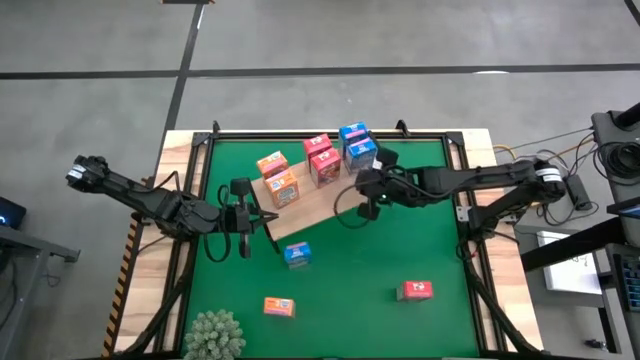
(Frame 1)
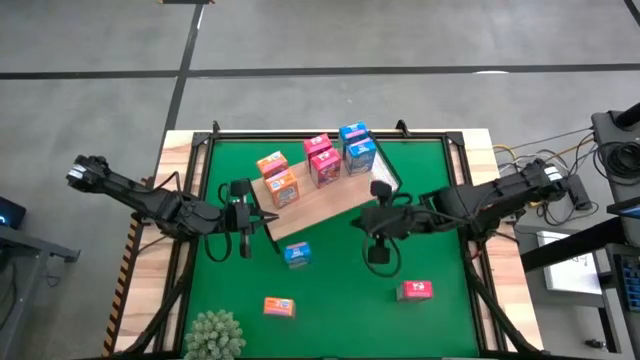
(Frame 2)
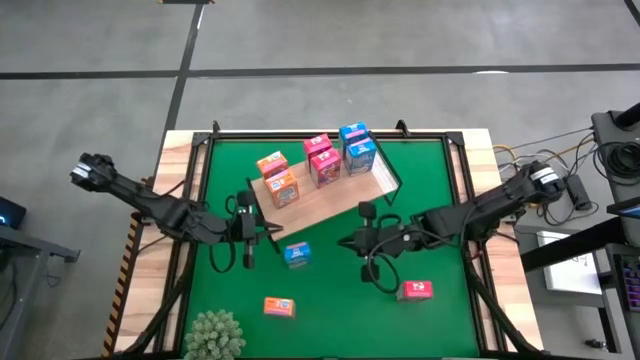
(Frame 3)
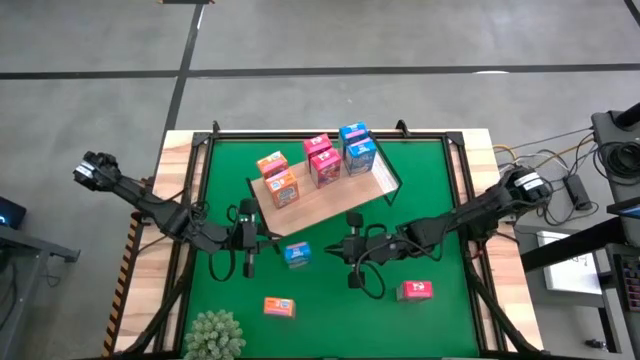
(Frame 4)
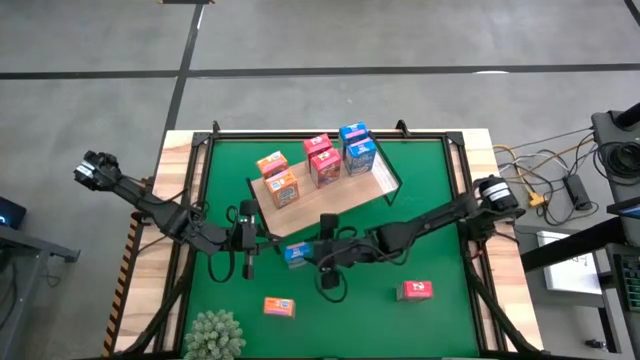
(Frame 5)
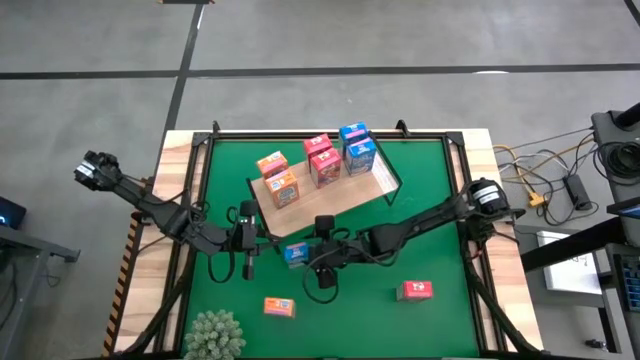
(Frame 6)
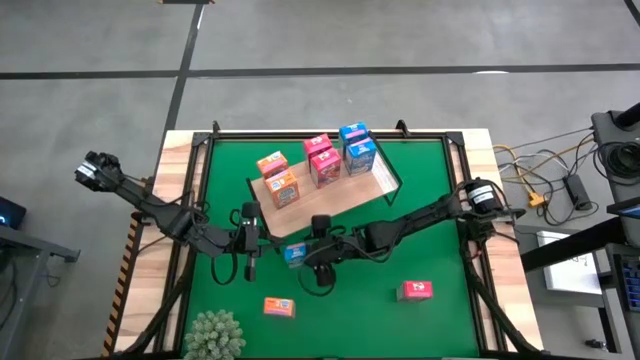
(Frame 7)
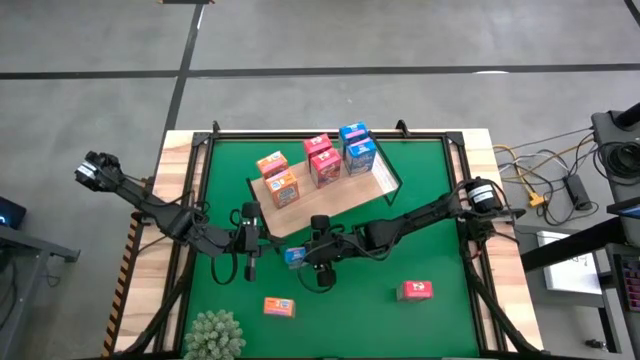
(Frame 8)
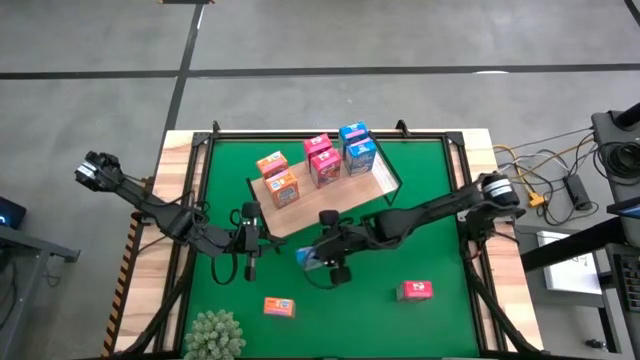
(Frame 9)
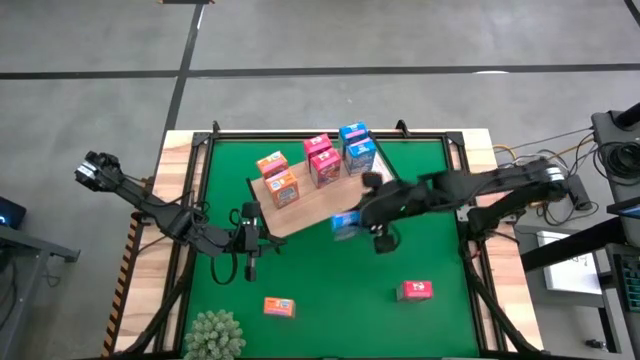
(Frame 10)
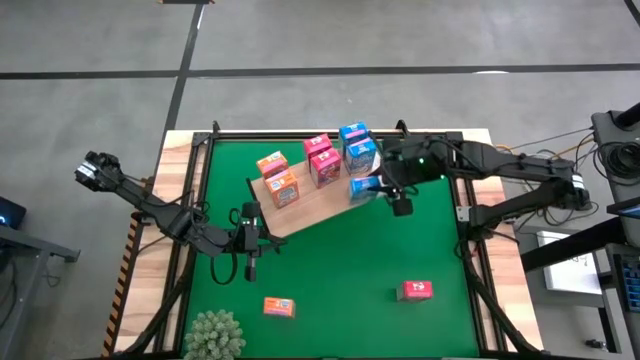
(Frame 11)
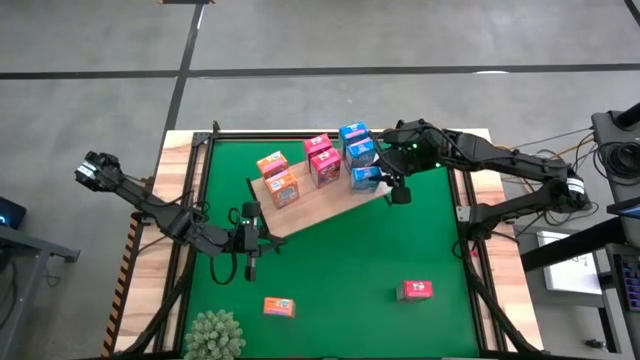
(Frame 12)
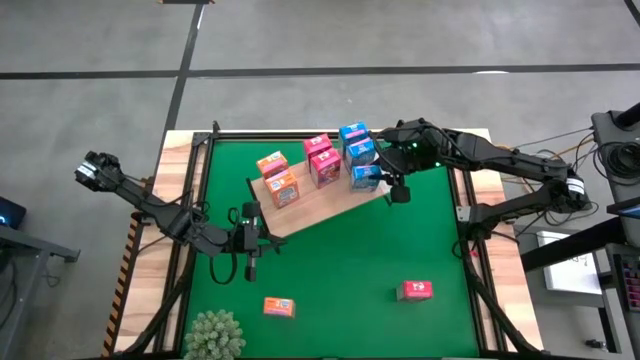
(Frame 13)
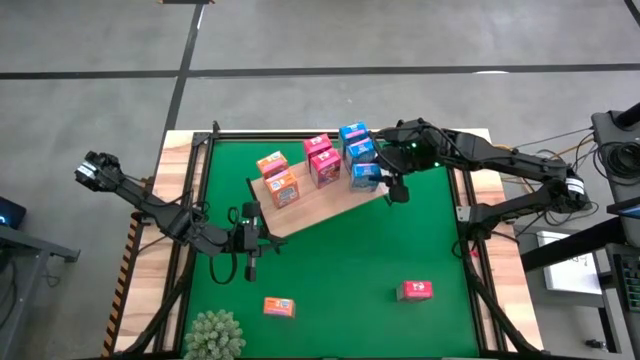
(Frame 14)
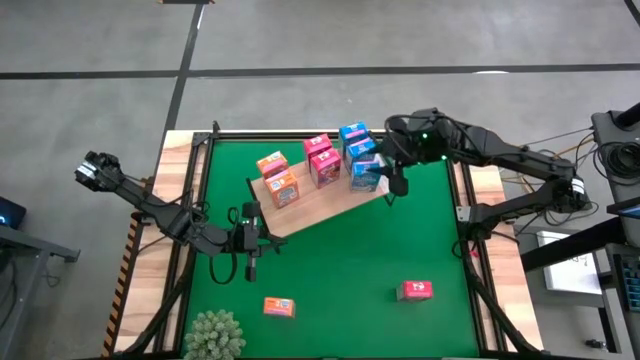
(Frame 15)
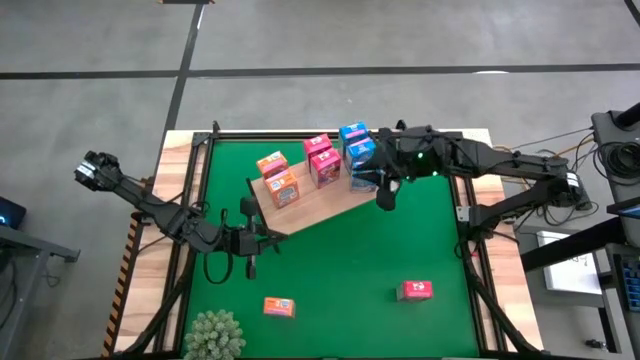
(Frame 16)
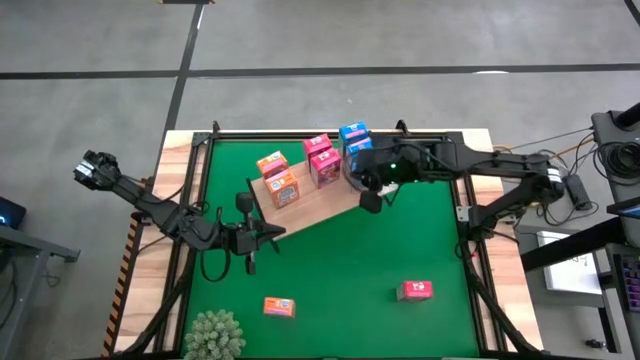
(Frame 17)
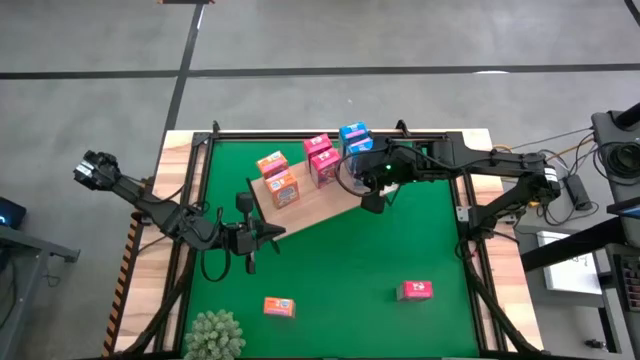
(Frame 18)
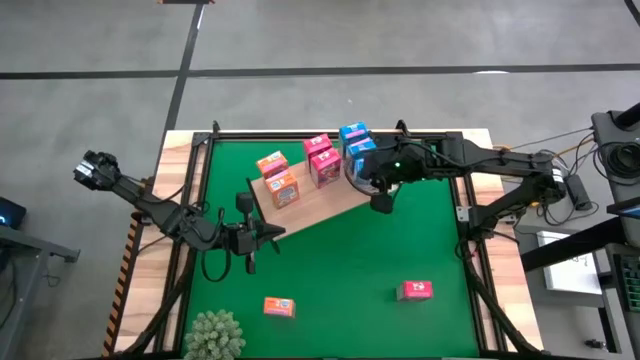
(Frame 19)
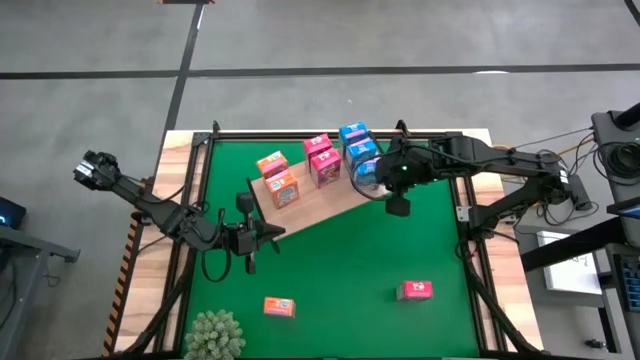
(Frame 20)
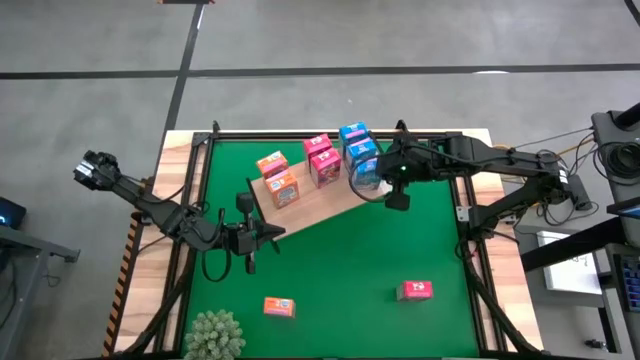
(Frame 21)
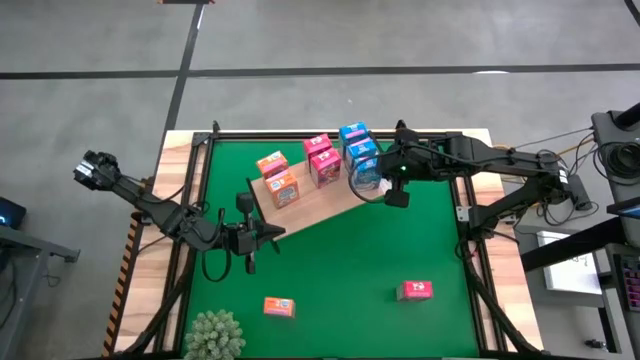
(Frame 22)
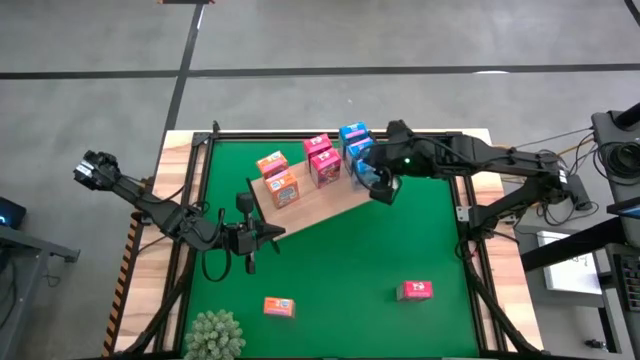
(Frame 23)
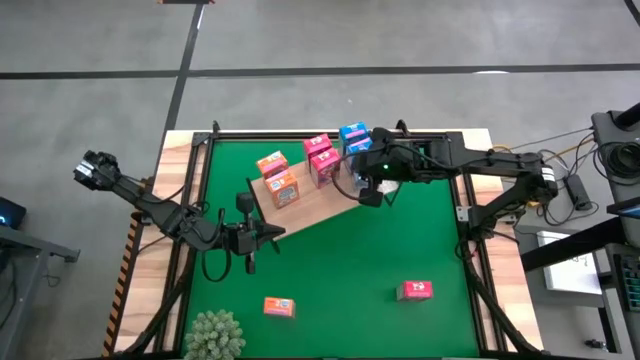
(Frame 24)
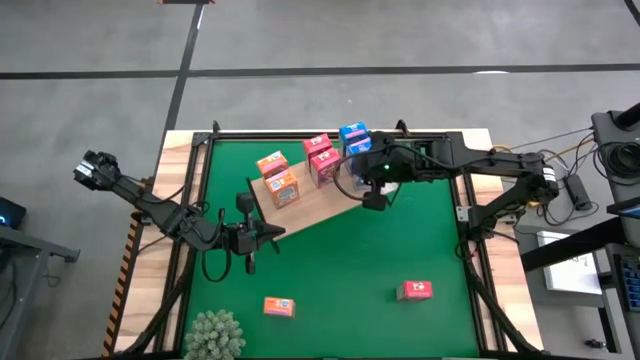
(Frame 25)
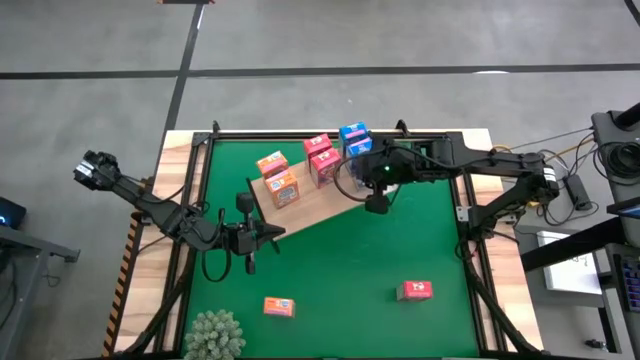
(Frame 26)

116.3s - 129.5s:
Task: Stack cereal on shelf
Put the blue cereal box on the shelf aligned with other blue cereal boxes

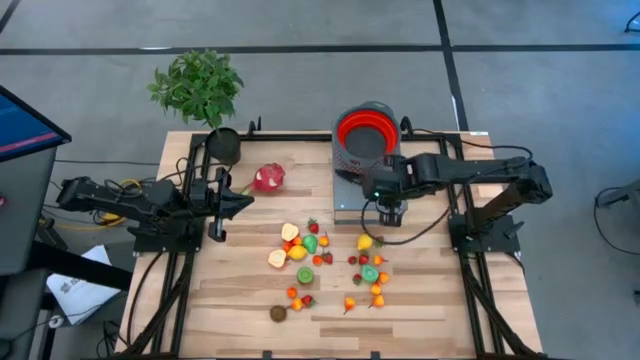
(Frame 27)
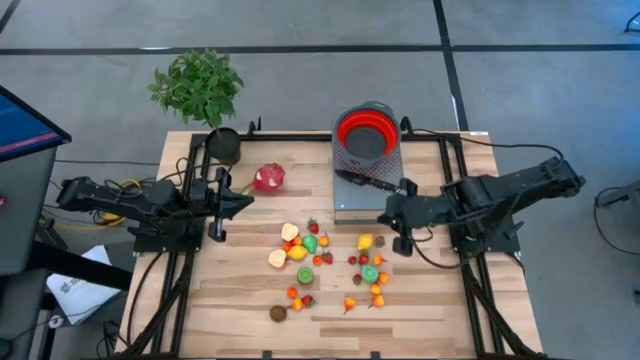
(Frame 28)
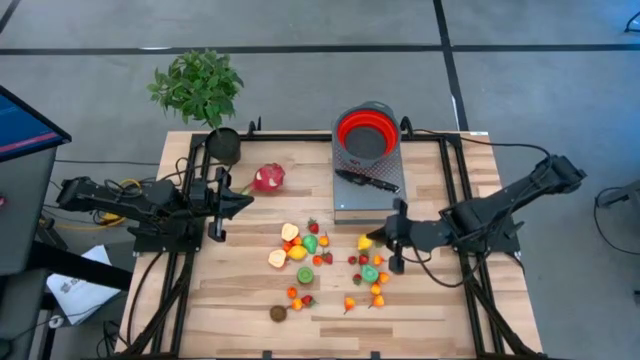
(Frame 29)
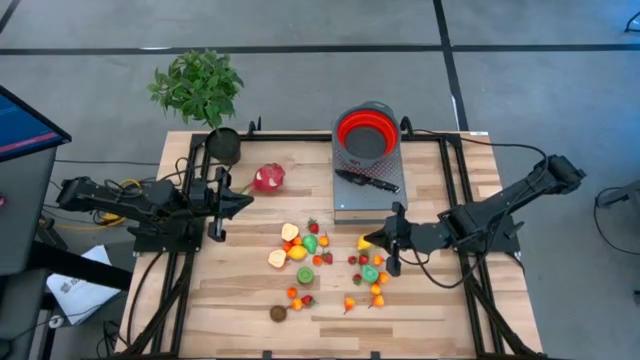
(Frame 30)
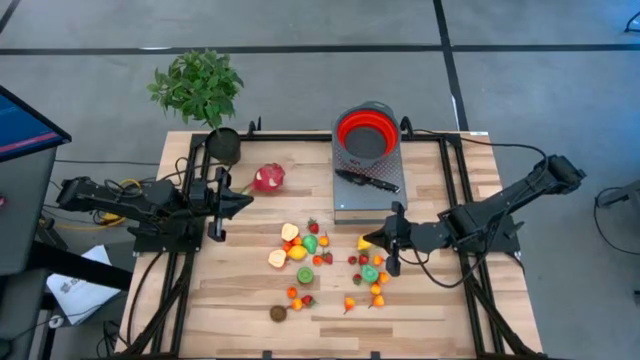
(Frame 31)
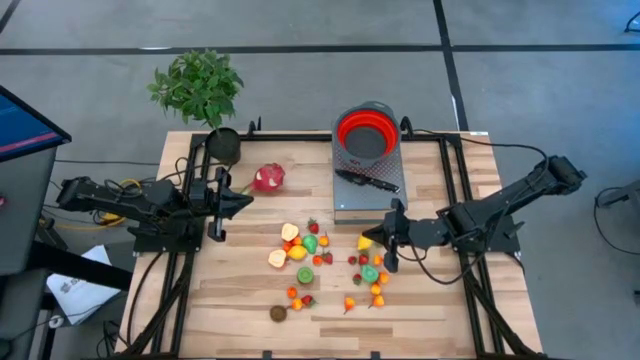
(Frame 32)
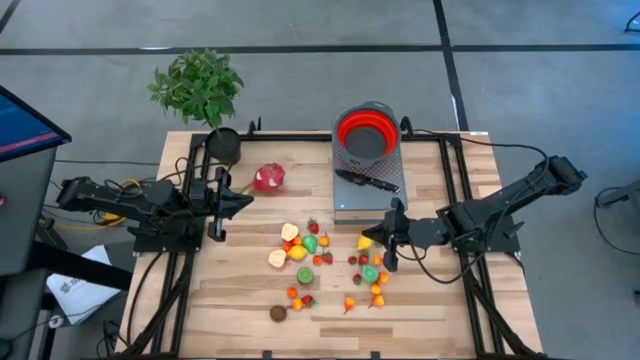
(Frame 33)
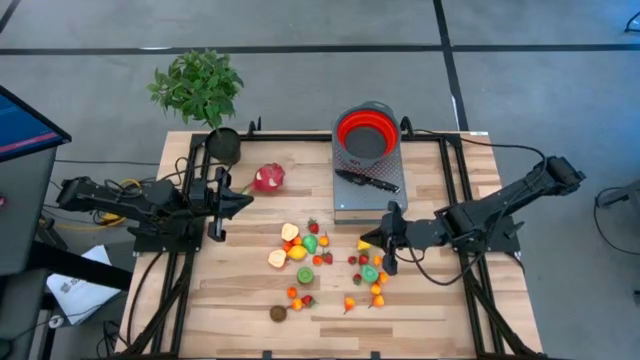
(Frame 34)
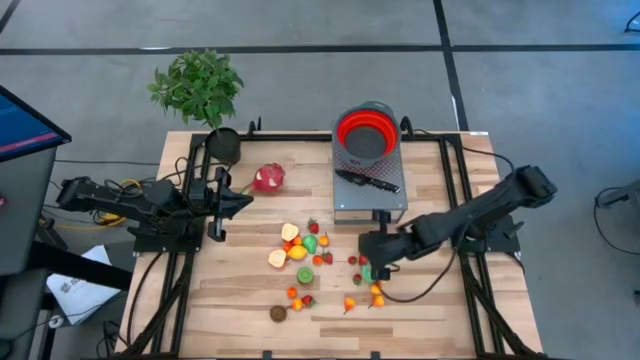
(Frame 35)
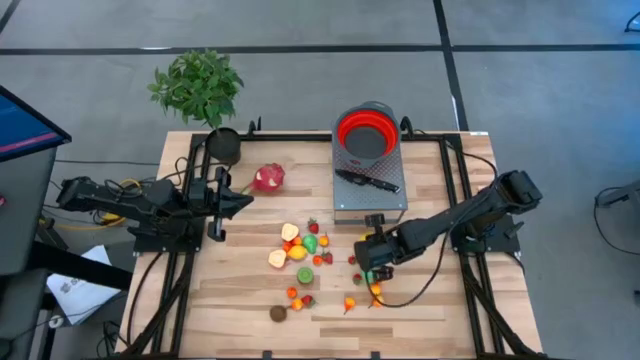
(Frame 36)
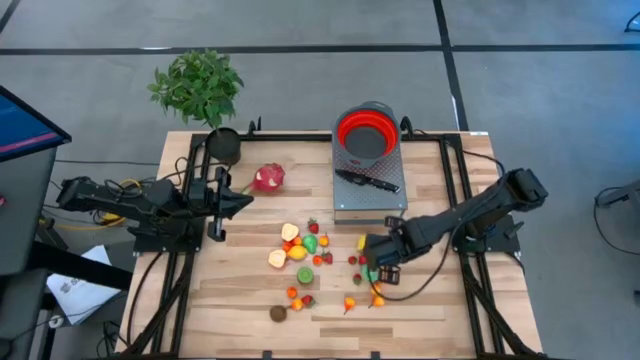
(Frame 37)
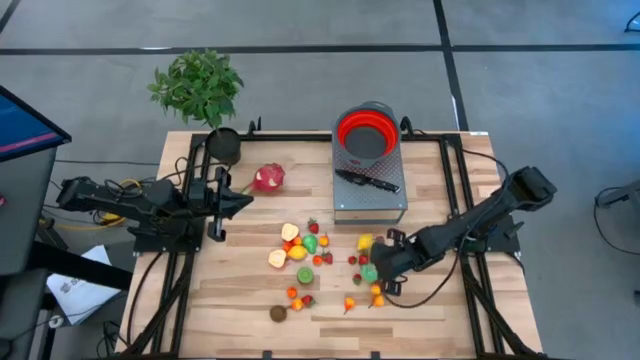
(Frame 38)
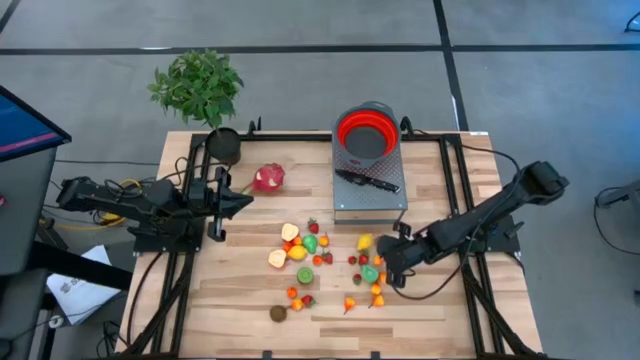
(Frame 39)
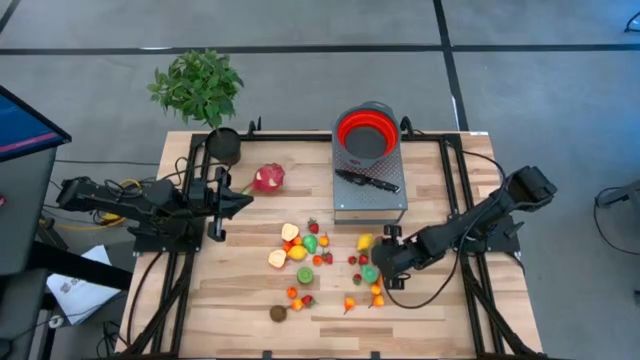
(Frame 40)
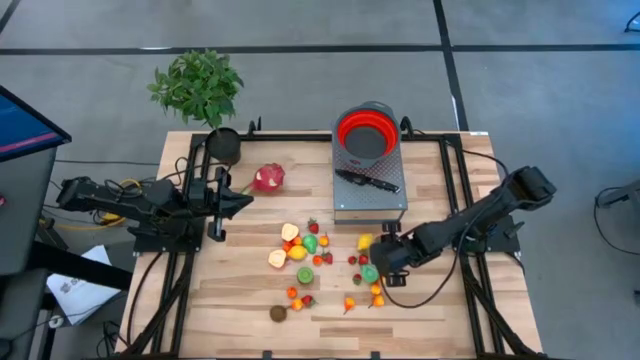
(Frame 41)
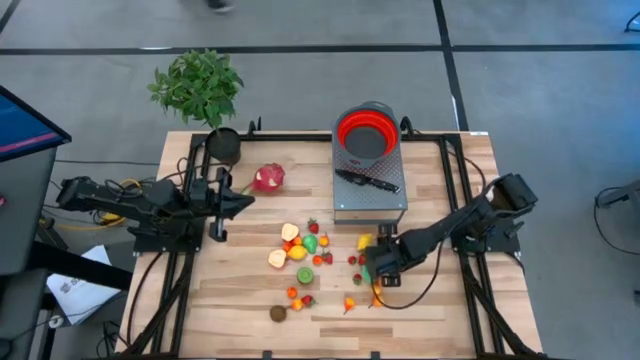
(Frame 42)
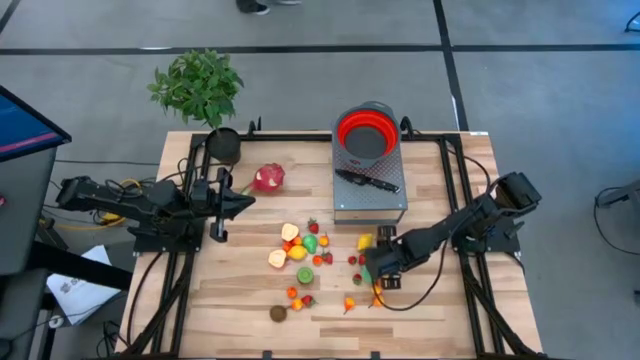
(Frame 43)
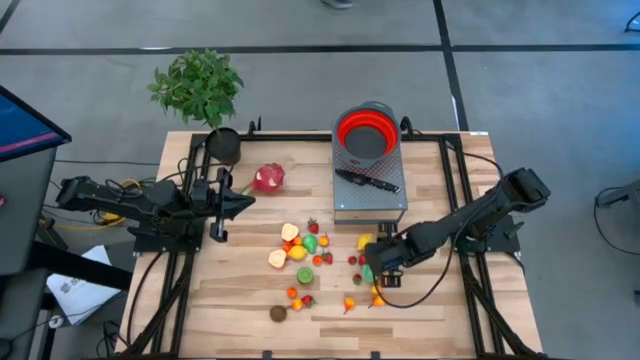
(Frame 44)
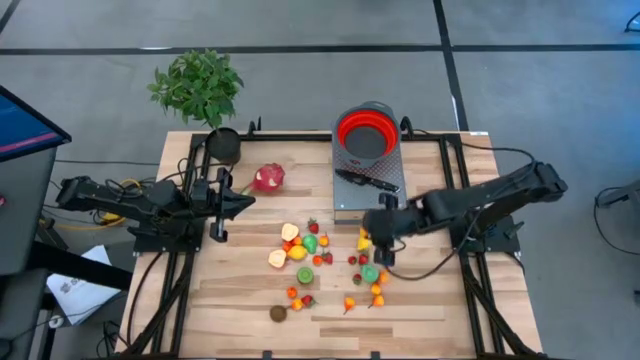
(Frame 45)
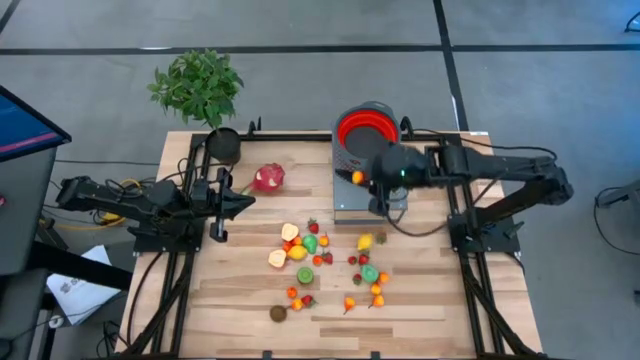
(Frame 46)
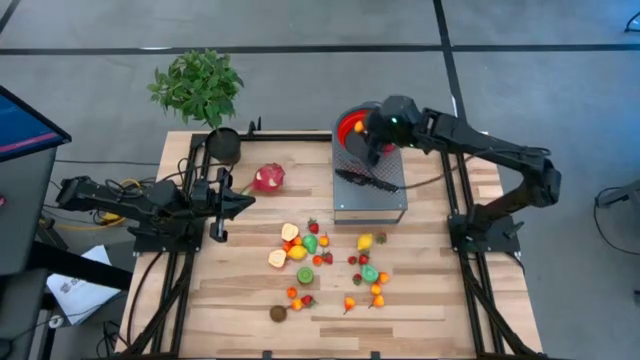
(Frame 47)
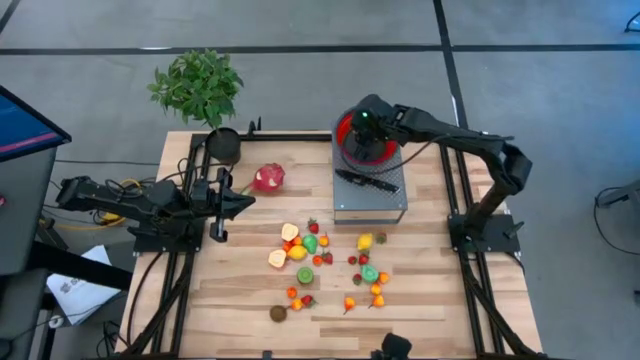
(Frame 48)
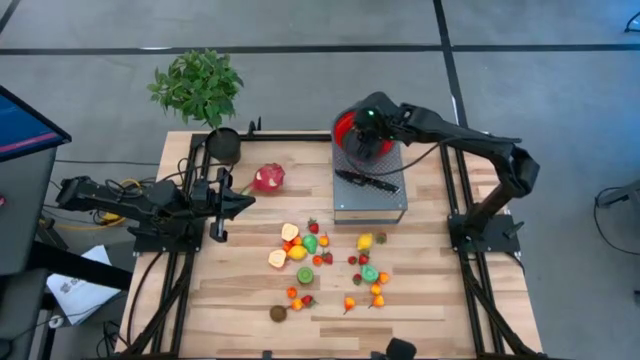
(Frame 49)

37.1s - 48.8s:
Task: Pick & Place Fruit
Put the yellow pear into the red colander on the shelf
